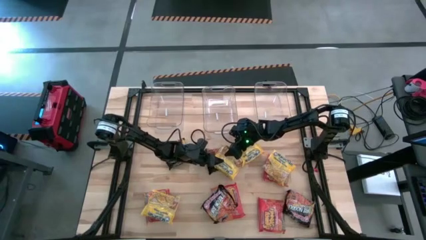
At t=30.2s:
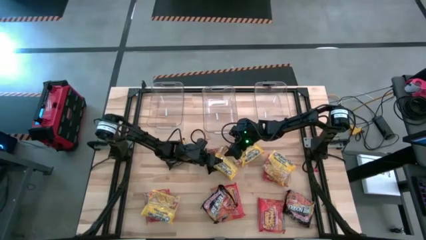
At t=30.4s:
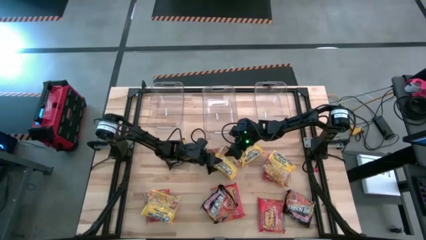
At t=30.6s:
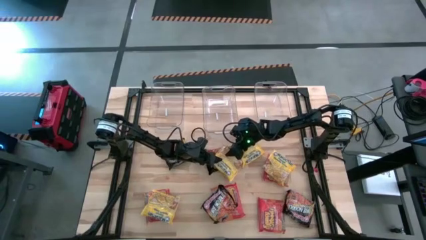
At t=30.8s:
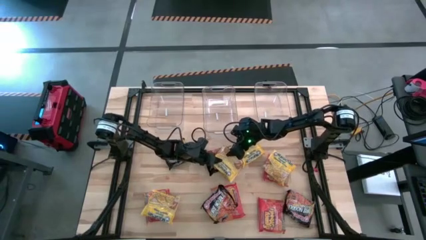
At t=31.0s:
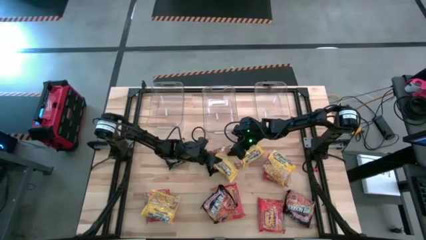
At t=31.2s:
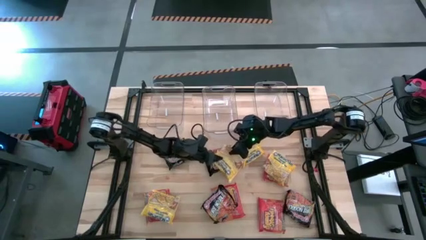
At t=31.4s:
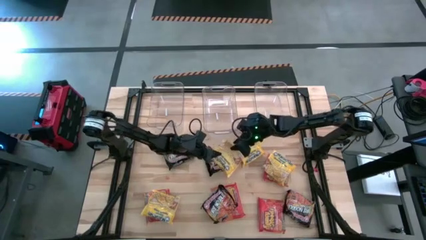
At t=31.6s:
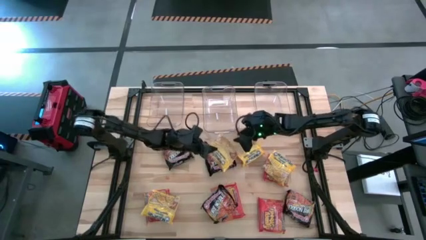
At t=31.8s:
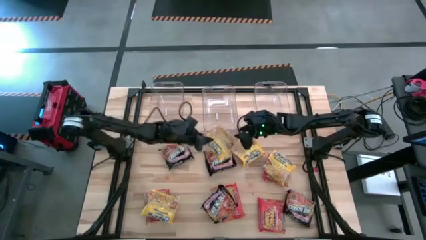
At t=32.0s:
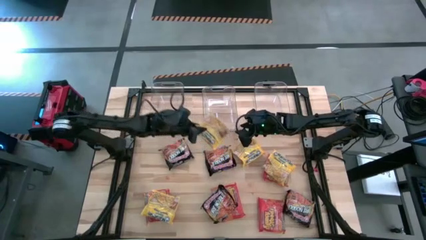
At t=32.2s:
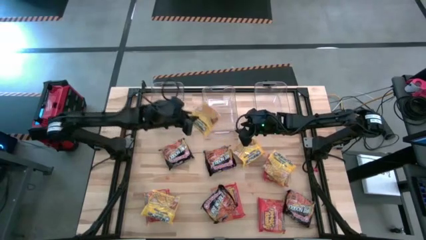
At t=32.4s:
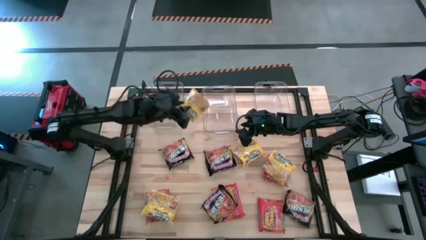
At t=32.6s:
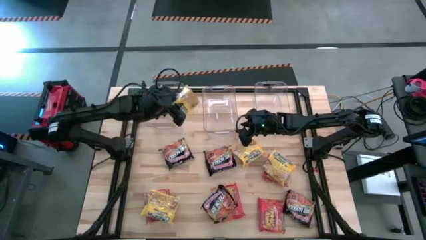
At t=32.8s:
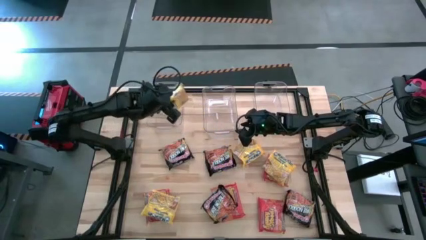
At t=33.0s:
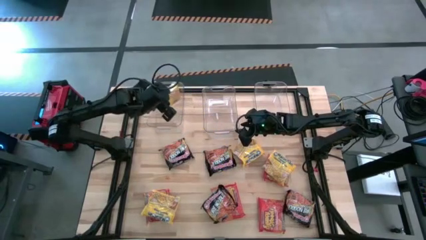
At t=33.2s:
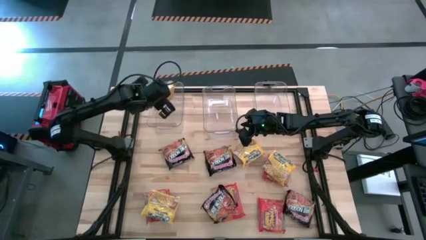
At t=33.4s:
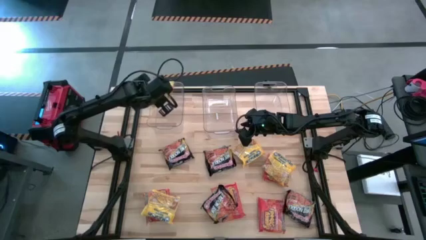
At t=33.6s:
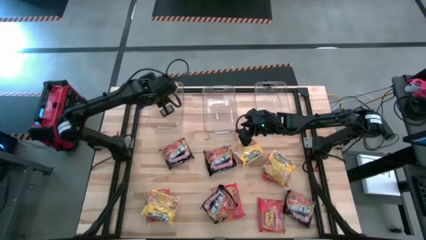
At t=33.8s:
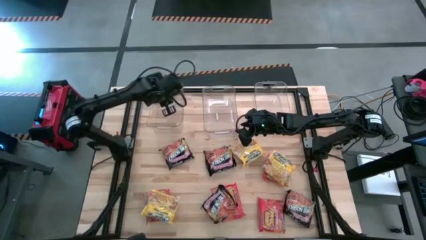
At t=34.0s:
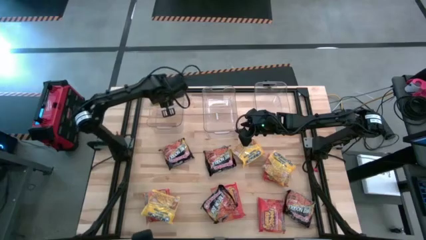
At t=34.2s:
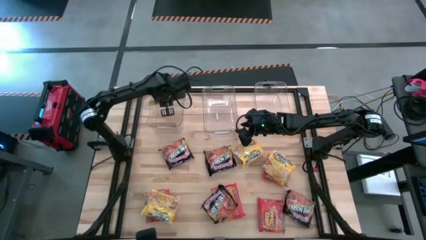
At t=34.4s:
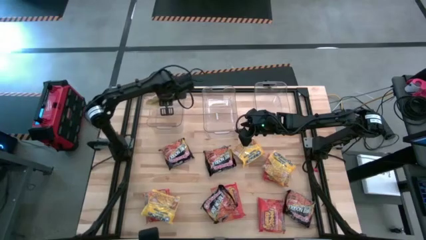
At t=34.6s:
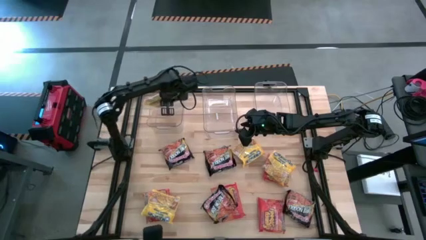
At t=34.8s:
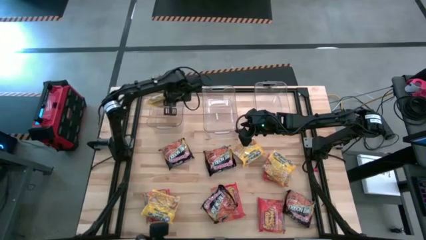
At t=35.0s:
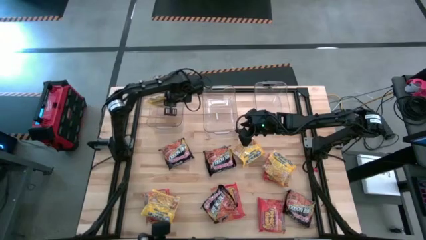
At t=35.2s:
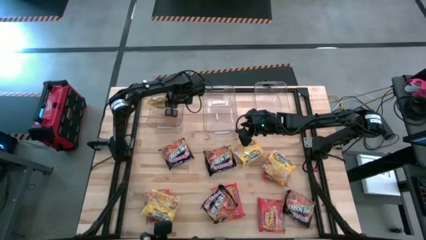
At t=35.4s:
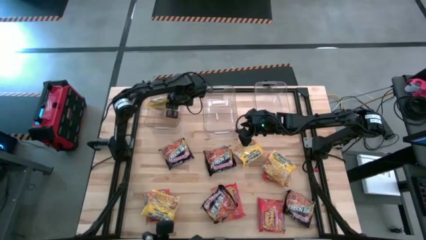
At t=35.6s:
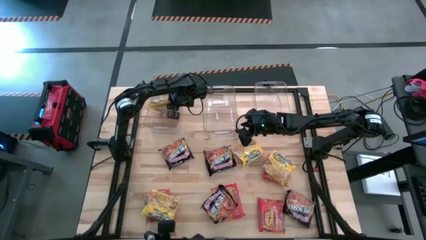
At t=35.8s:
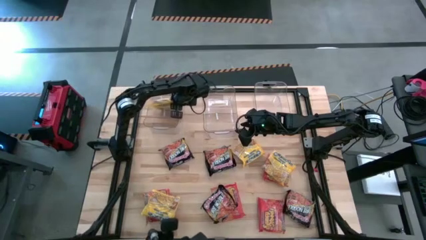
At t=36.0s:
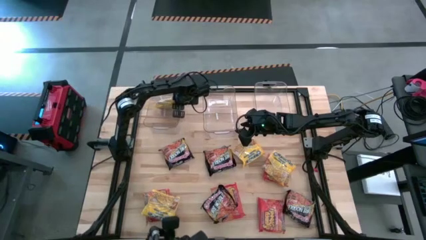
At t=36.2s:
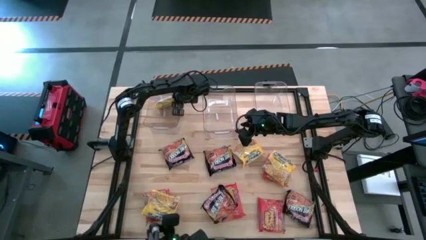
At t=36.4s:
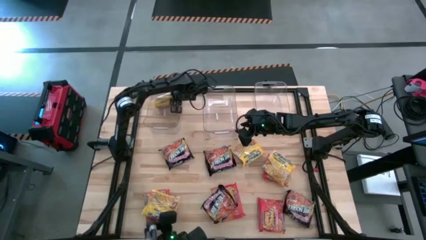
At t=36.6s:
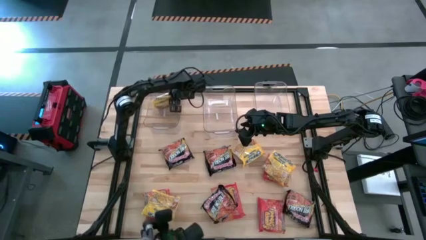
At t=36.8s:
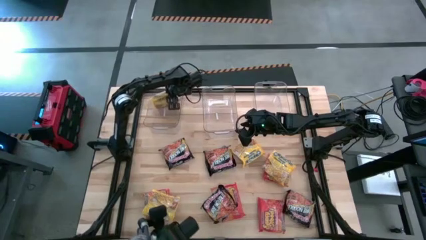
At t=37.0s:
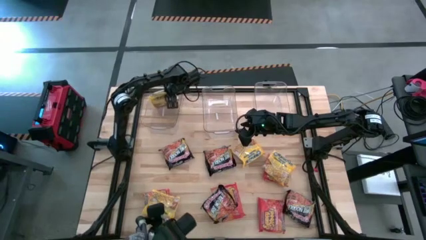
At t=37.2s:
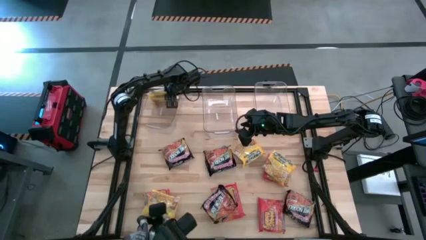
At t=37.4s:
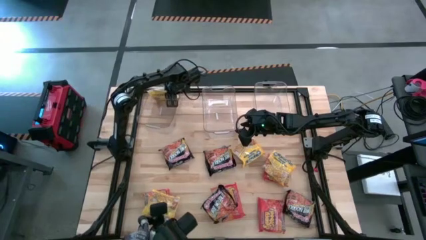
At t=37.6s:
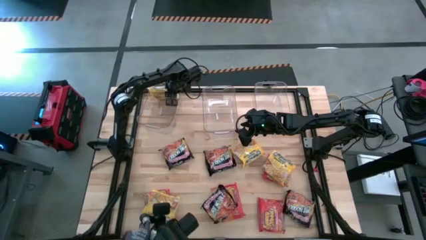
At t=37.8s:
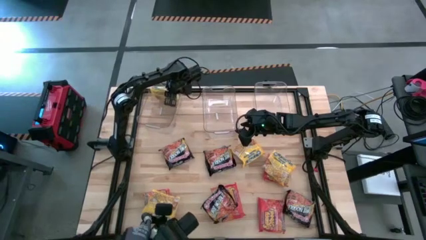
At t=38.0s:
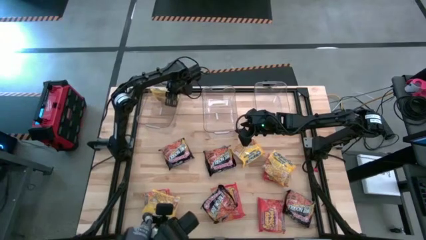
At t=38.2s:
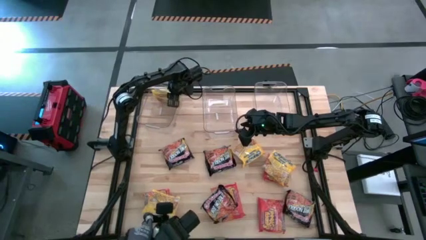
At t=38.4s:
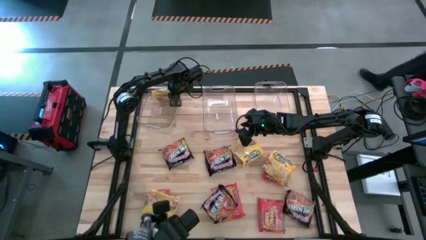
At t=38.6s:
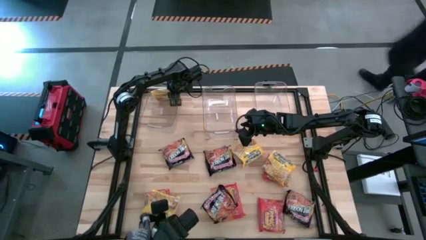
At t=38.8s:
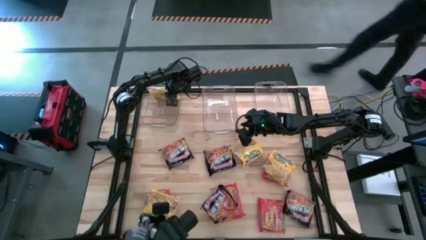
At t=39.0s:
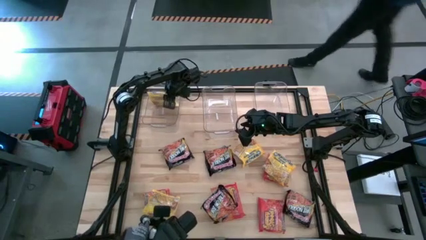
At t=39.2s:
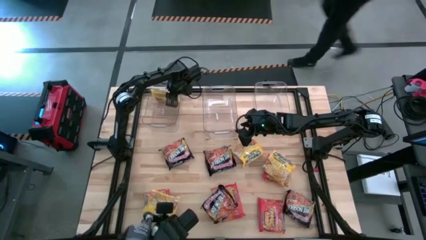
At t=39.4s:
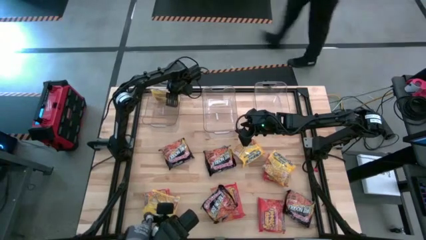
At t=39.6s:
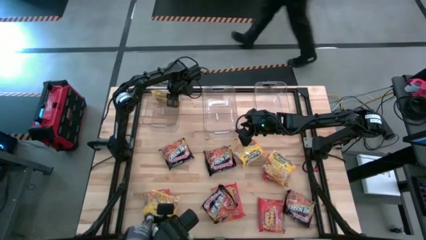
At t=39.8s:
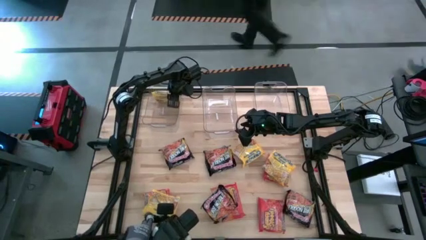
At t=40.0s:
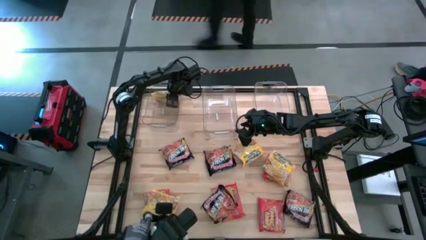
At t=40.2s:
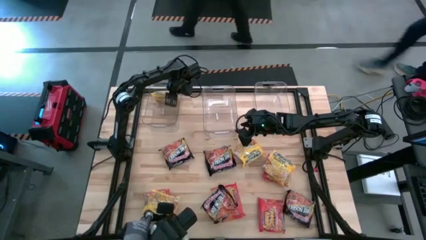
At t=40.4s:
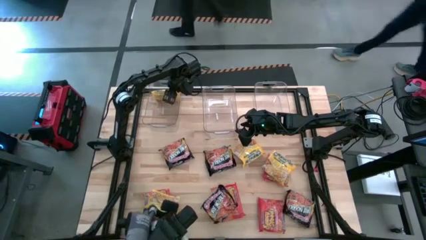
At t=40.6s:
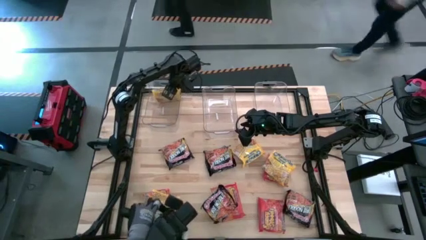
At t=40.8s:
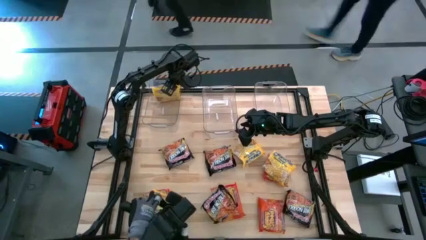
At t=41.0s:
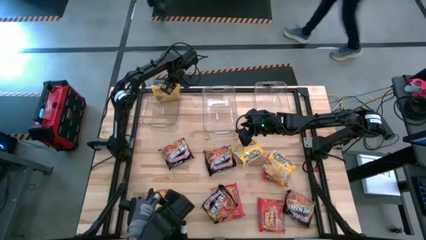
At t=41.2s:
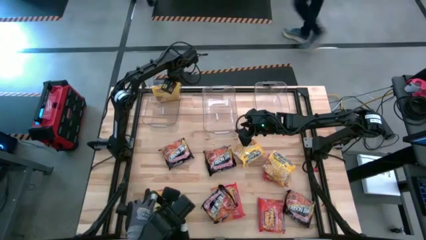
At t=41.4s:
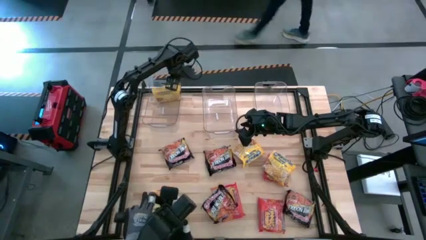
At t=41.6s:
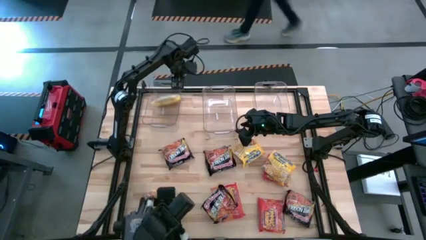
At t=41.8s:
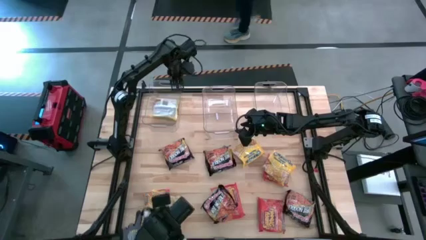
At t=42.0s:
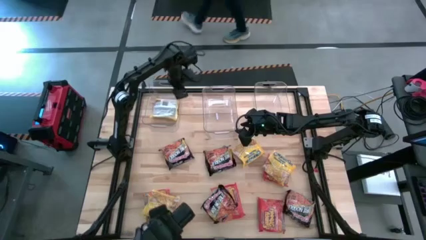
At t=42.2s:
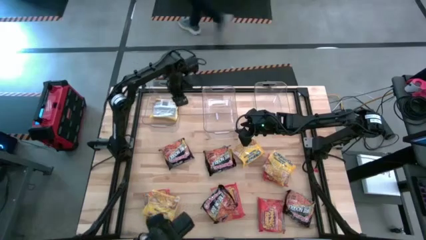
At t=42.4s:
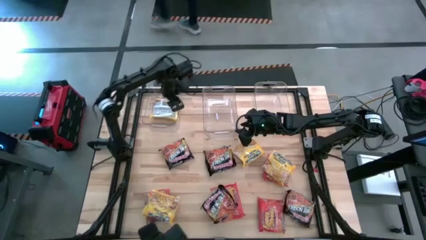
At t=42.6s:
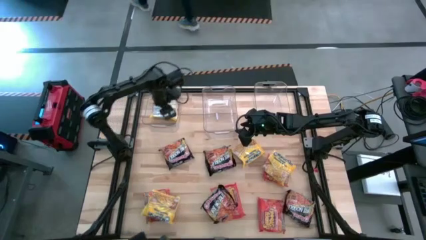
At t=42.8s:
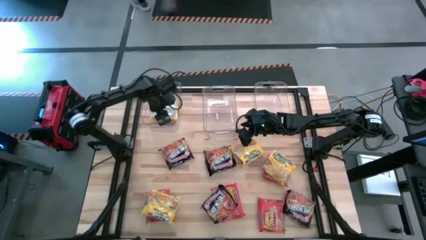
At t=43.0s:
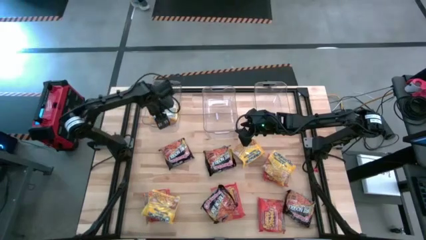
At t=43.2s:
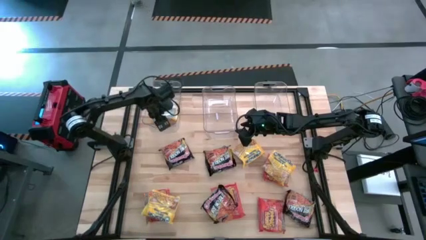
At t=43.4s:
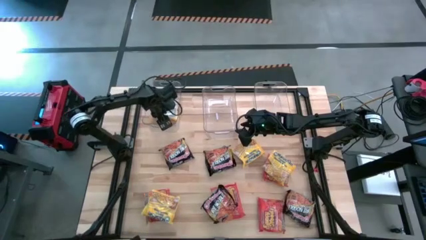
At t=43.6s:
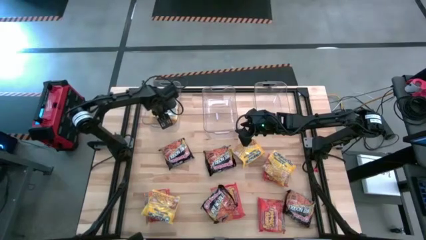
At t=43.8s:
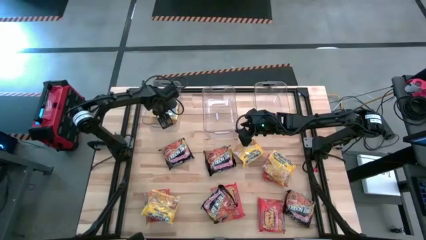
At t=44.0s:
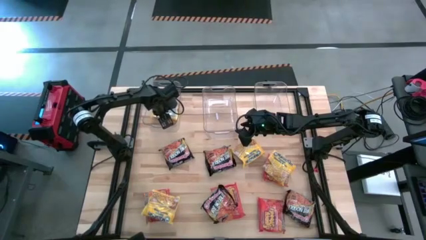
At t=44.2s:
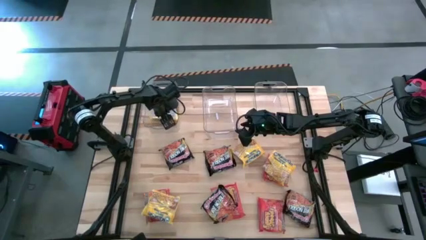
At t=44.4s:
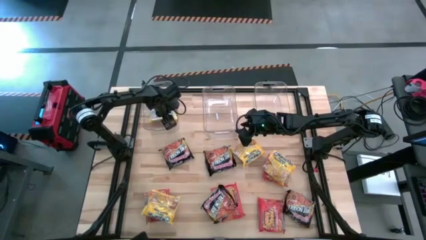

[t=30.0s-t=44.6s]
Task: Sort Maruchan noodles
Put the yellow noodle pack into the left transparent bin
